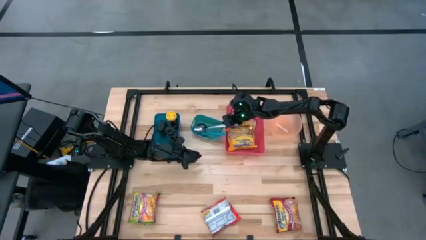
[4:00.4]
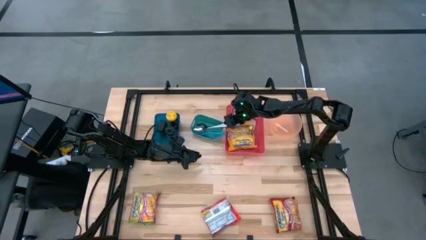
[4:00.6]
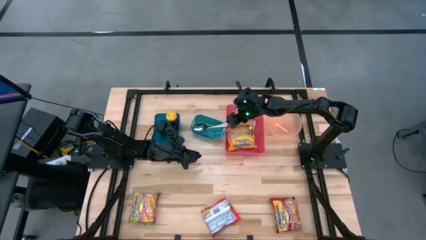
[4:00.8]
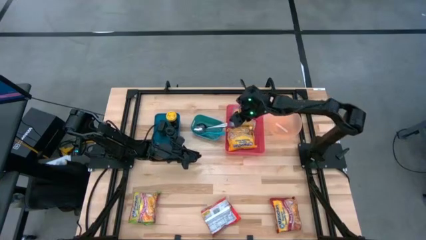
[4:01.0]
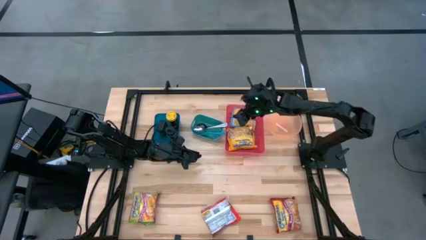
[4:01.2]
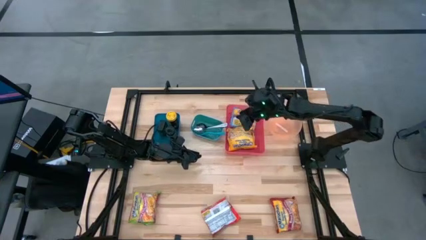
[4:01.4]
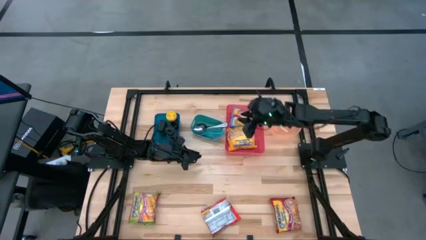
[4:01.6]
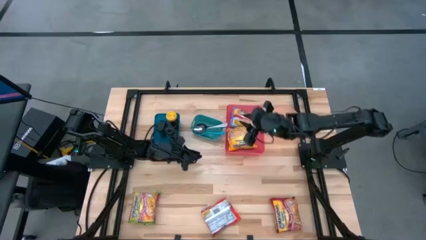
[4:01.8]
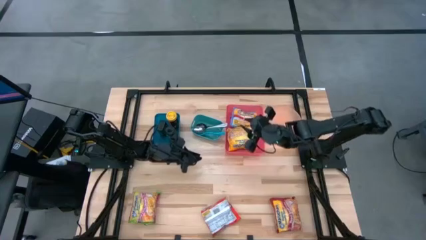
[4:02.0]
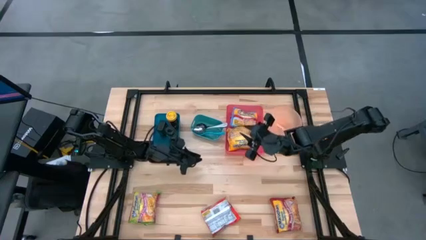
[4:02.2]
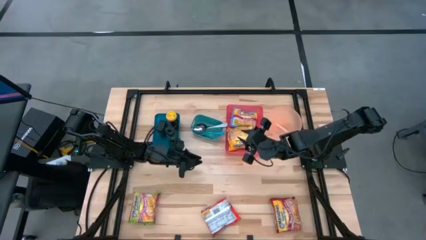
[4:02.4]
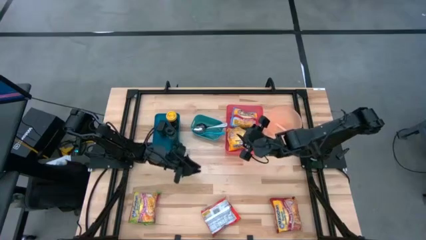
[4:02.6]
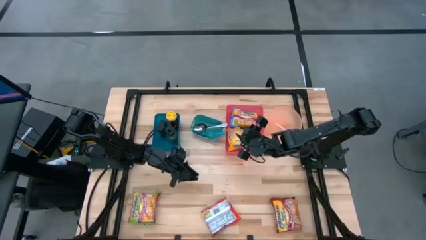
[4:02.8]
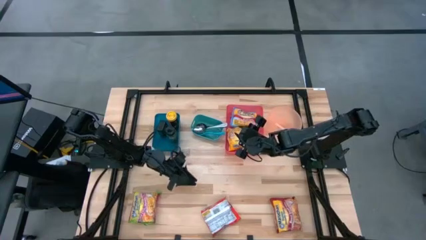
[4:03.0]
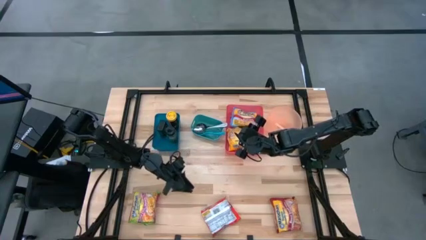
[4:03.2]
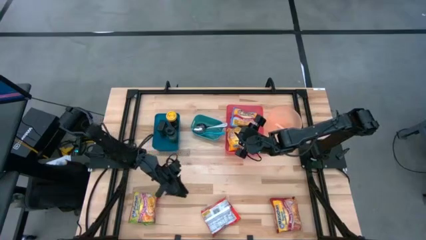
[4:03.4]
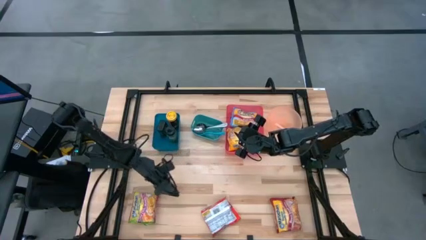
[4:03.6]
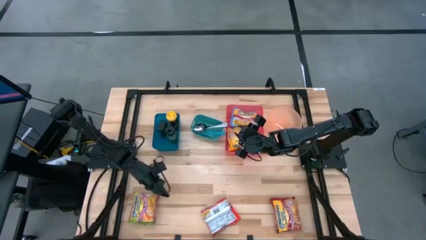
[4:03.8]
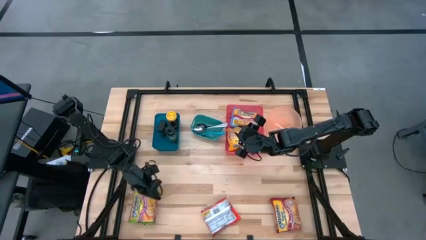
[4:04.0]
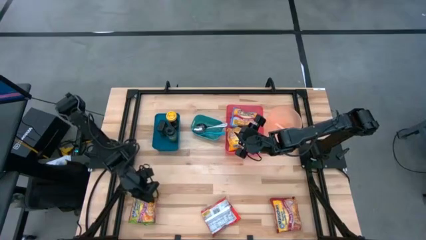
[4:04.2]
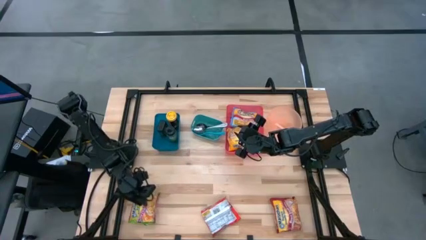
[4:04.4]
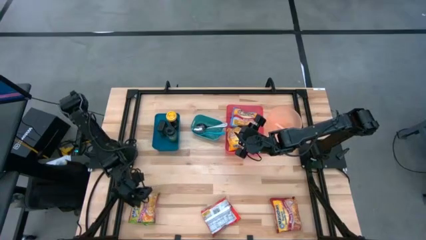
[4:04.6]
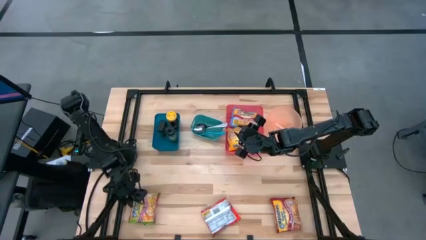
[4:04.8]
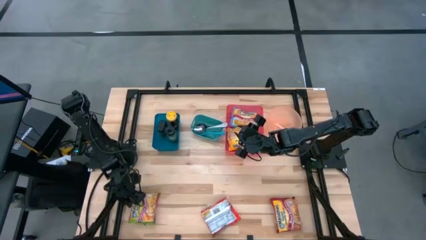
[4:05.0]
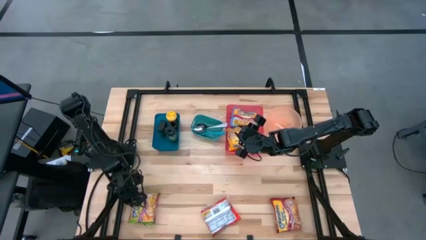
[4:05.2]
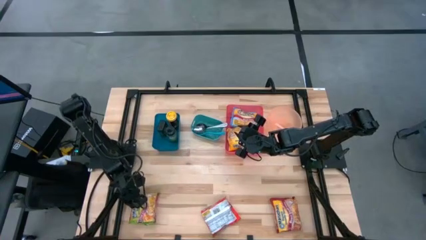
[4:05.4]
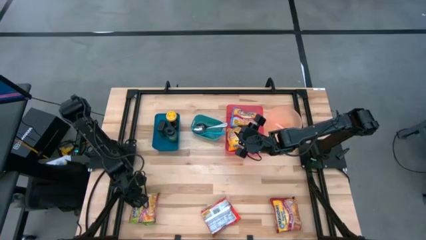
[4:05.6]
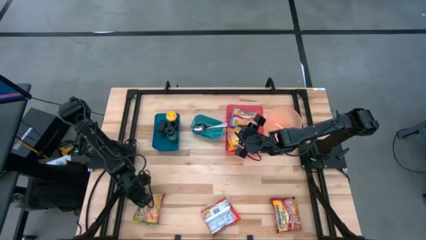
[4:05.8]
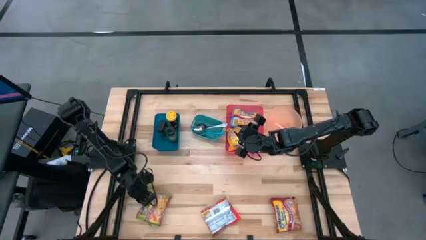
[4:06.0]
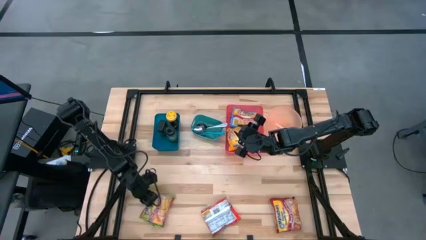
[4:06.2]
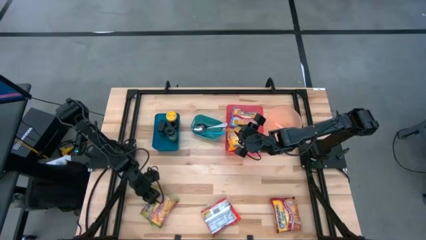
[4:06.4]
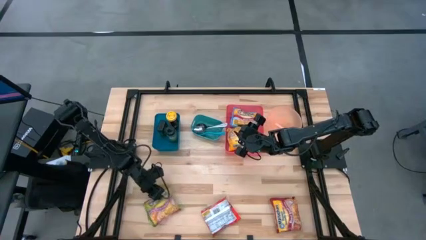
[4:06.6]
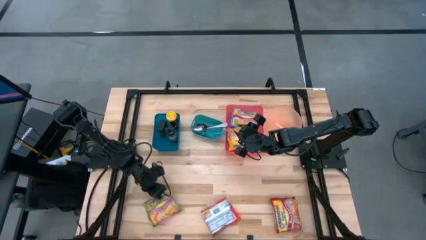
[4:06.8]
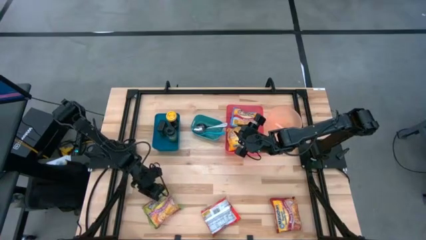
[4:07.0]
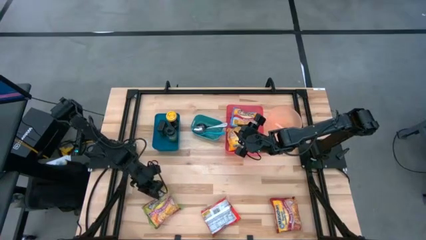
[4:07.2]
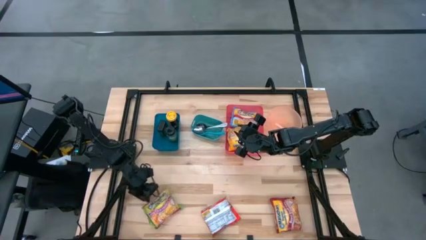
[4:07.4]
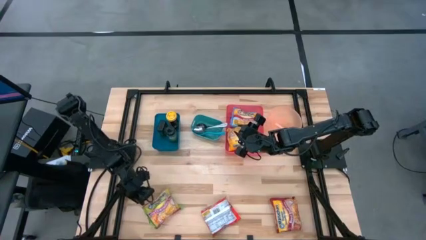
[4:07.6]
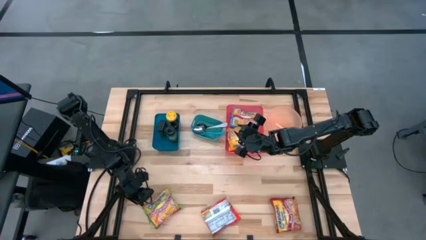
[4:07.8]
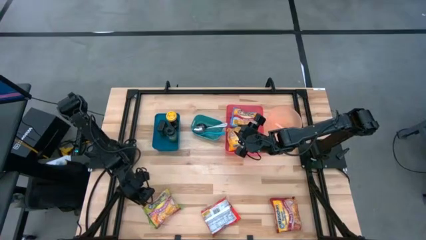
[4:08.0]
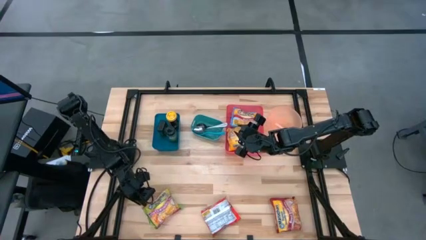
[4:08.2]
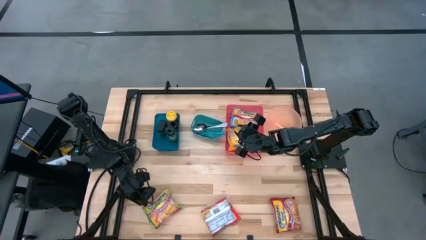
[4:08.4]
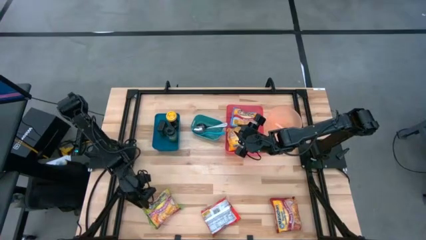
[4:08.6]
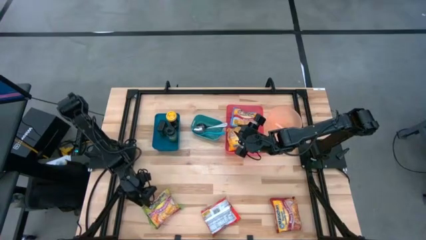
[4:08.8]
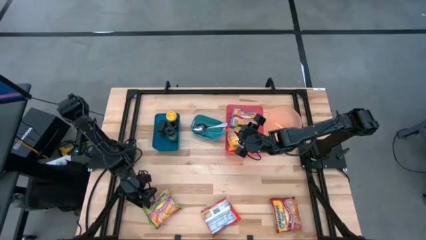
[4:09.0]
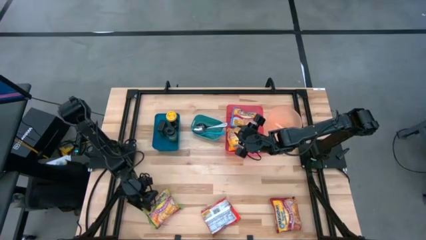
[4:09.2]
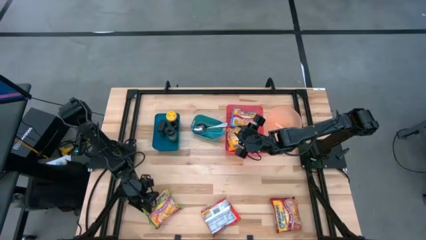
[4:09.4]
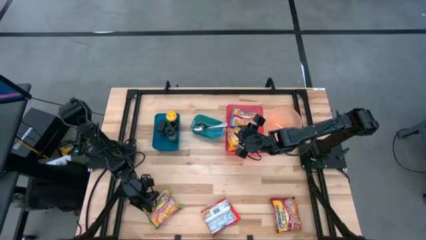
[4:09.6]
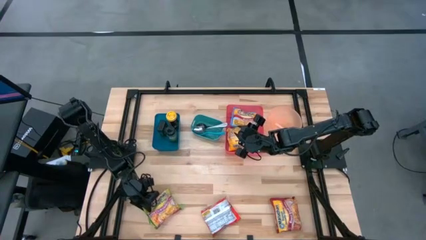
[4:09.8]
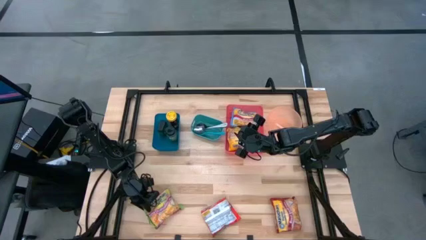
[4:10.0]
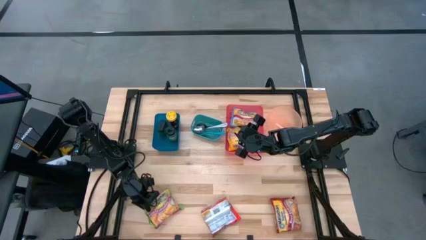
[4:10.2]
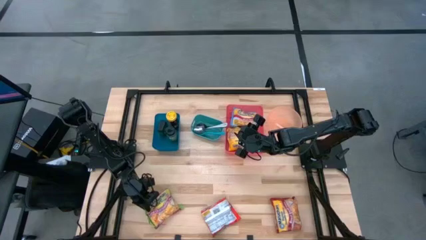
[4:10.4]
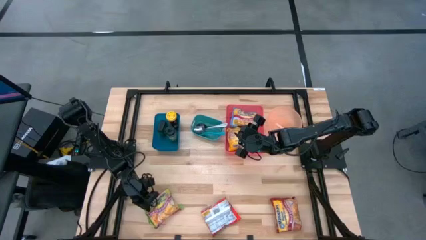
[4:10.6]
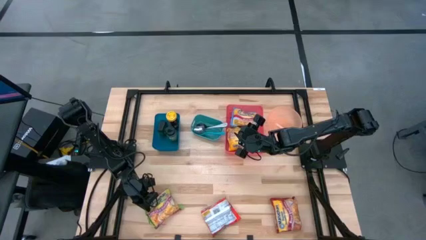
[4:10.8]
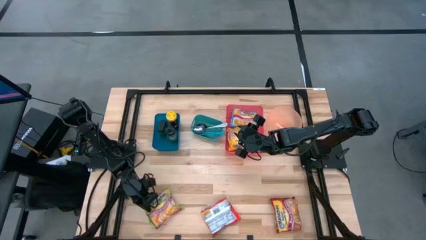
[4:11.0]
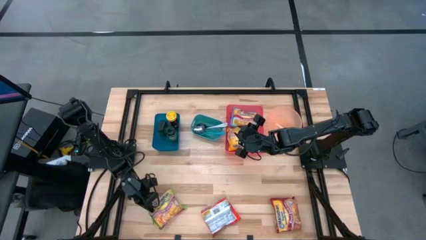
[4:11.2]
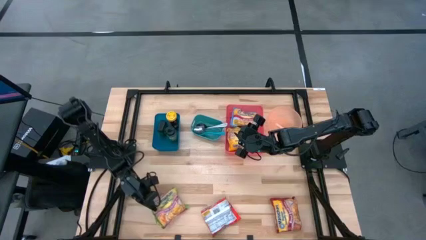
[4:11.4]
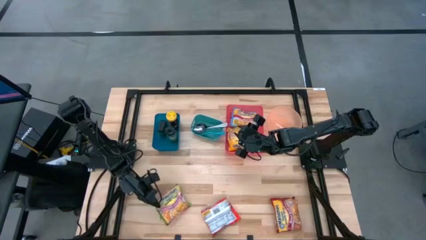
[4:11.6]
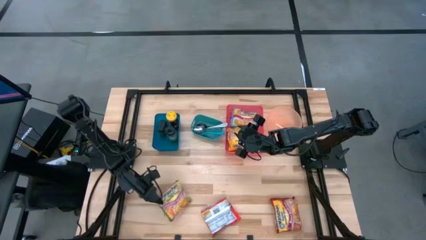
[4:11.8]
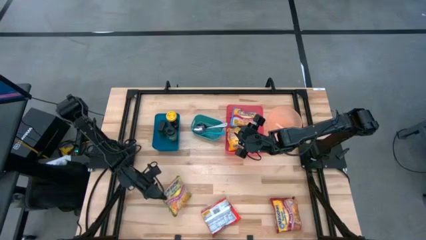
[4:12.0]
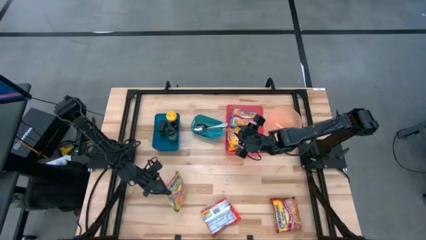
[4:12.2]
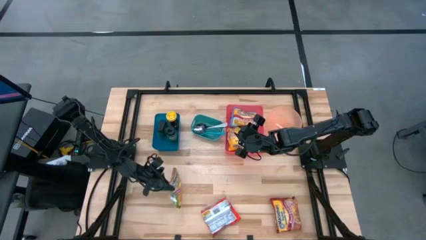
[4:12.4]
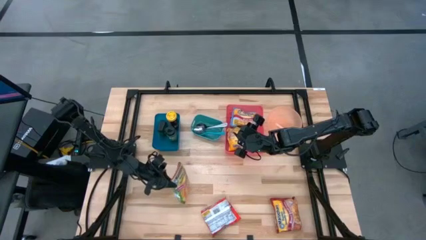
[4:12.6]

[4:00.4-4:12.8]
Task: Pick & Place Food Item
Put the green noodle pack into the red bin

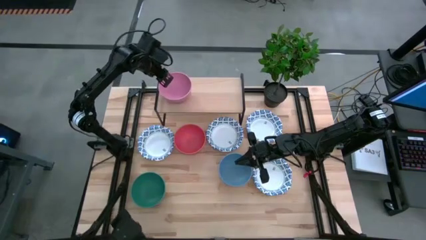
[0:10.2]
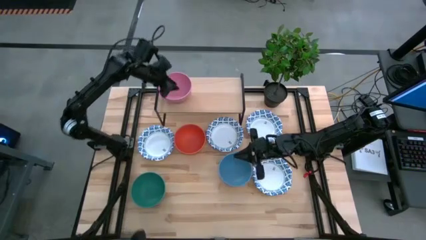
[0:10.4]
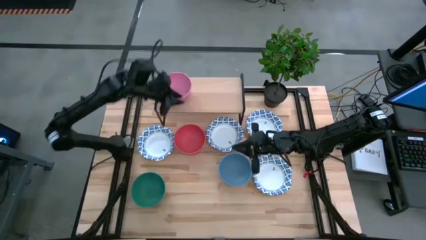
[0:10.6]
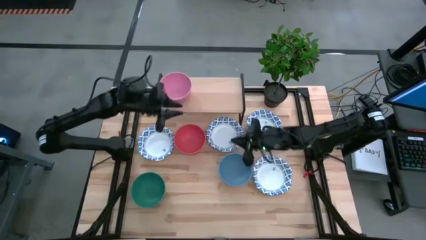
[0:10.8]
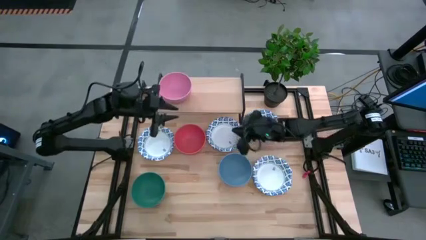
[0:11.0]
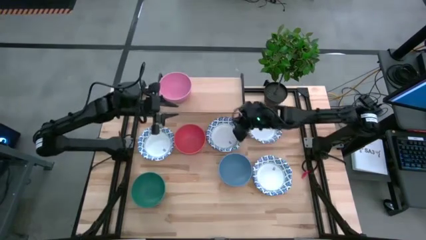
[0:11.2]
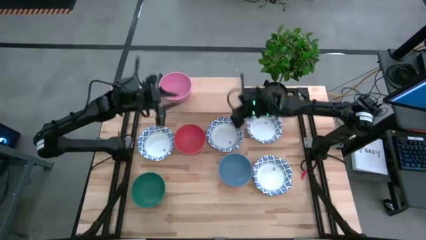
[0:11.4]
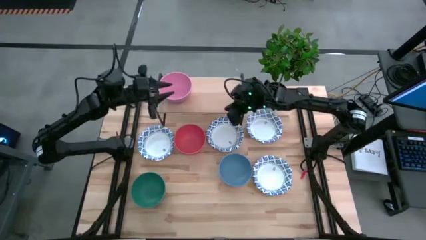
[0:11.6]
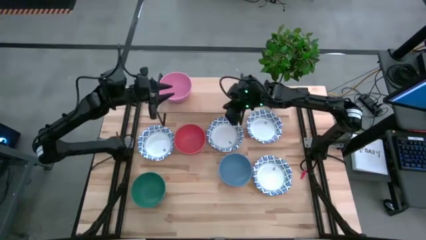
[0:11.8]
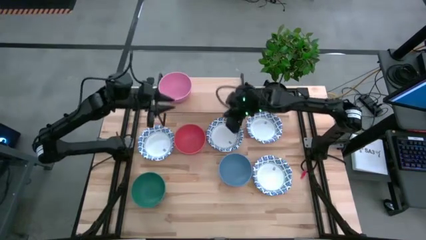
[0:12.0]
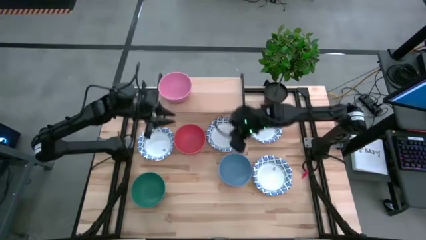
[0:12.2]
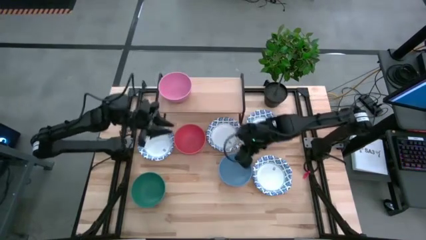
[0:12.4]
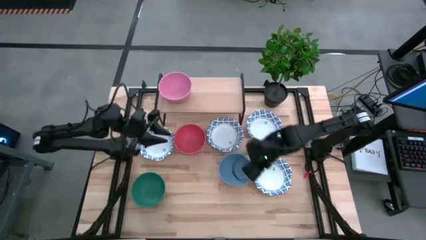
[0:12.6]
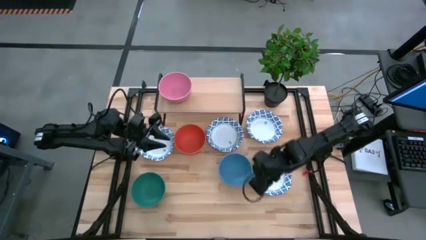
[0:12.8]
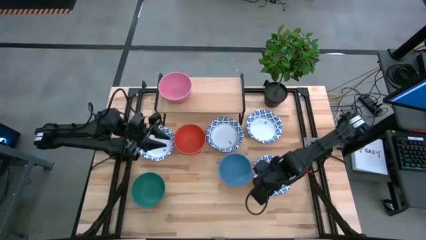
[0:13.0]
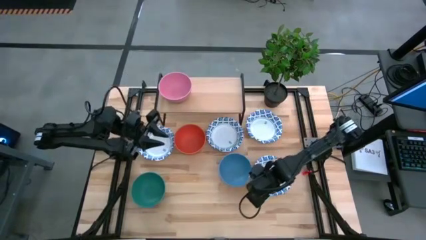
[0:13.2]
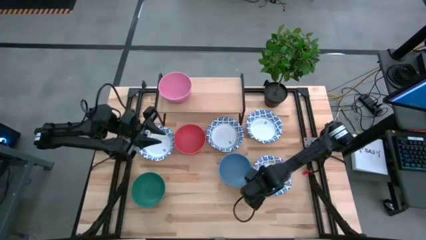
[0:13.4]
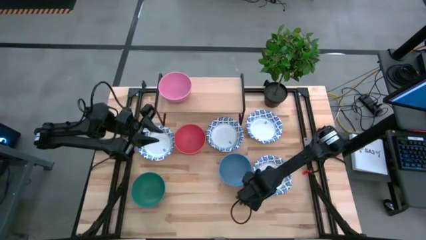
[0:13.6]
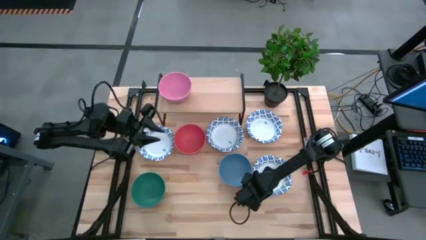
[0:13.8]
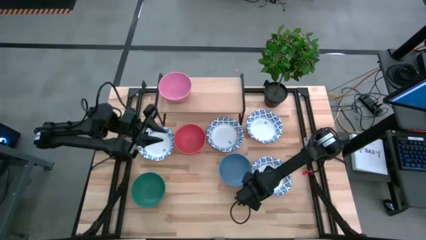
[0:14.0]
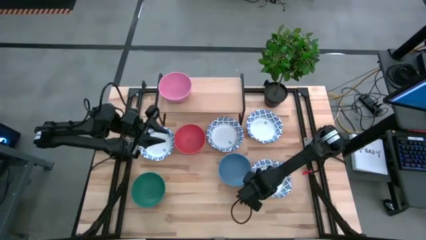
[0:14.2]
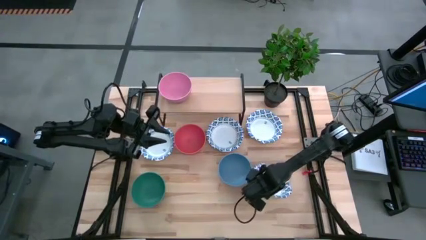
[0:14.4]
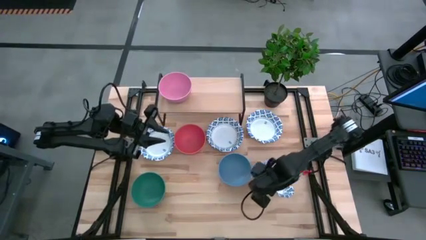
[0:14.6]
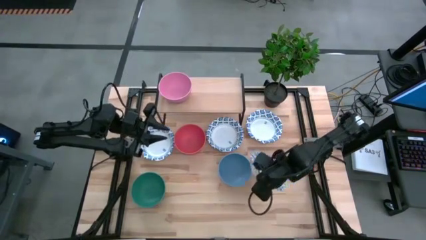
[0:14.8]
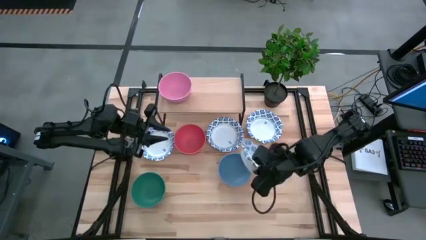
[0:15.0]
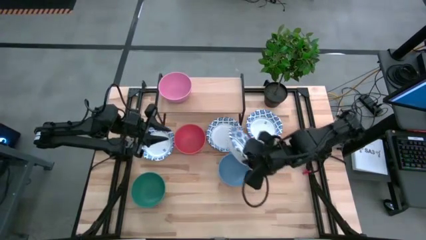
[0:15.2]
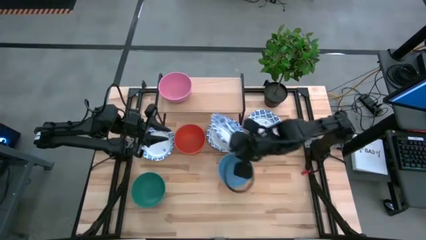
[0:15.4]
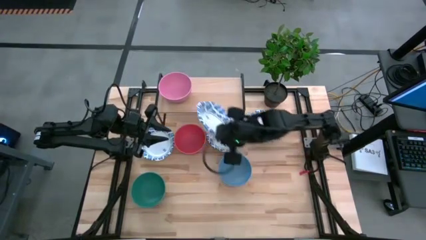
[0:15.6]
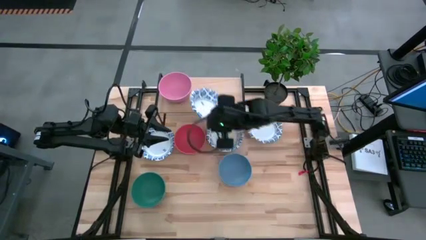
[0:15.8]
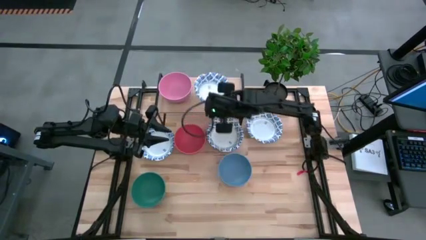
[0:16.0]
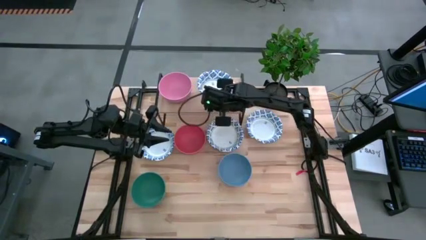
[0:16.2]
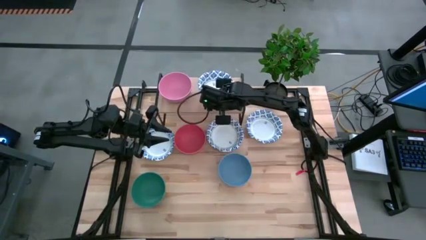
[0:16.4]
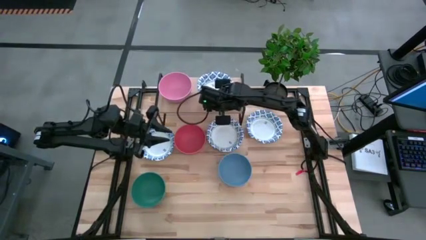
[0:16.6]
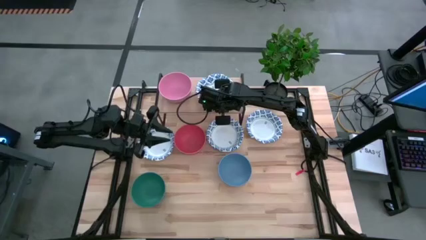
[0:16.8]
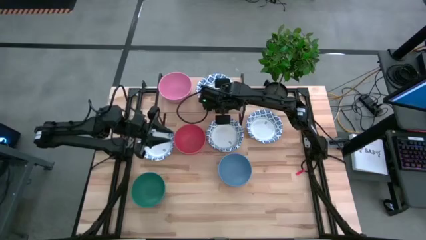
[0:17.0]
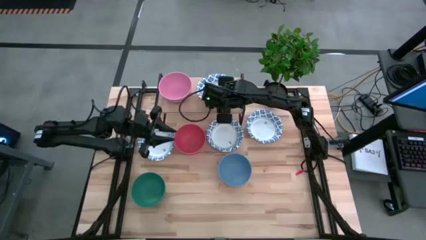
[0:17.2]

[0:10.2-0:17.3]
Task: Place and stack bowls onto a shelf
Put the bottom right white bowl on the shelf
